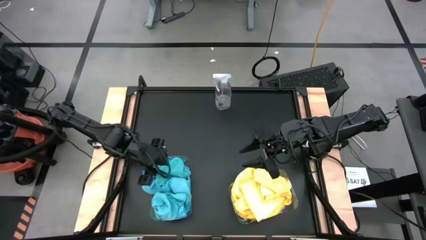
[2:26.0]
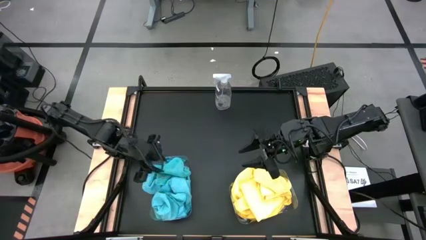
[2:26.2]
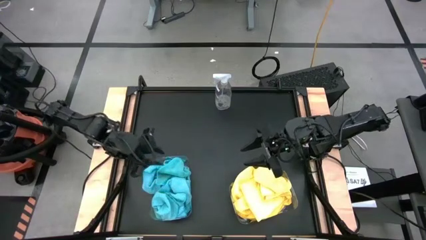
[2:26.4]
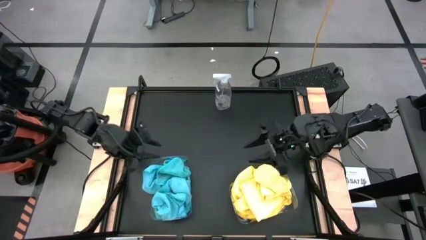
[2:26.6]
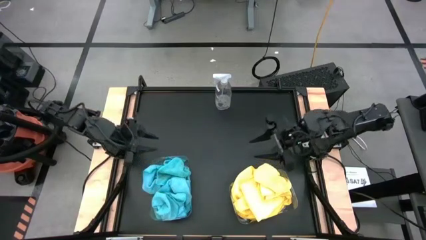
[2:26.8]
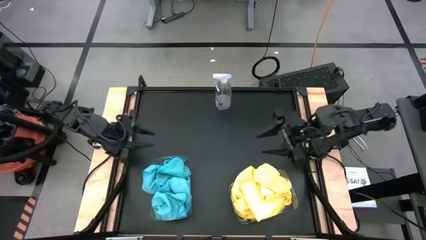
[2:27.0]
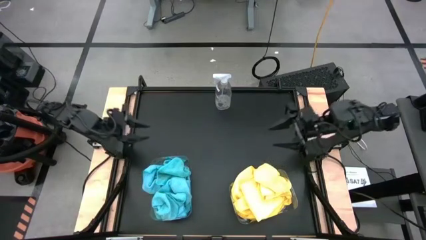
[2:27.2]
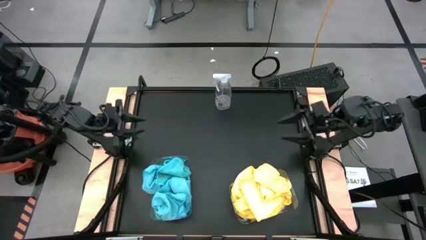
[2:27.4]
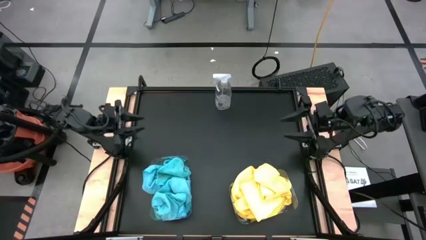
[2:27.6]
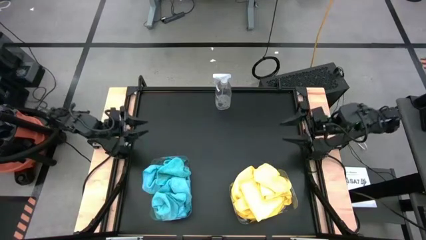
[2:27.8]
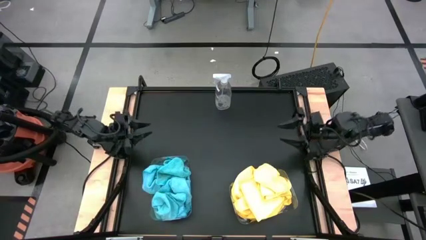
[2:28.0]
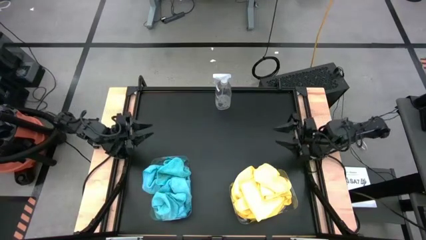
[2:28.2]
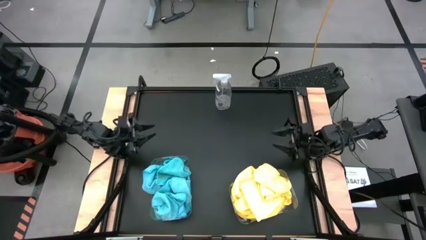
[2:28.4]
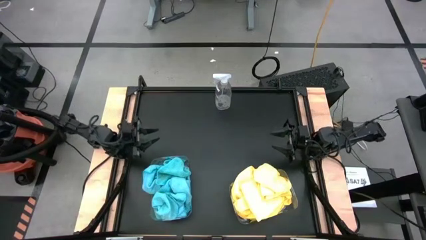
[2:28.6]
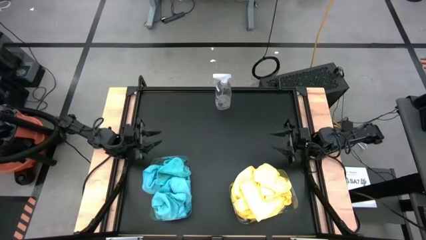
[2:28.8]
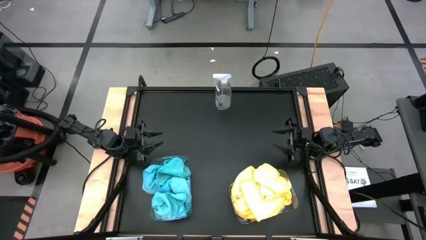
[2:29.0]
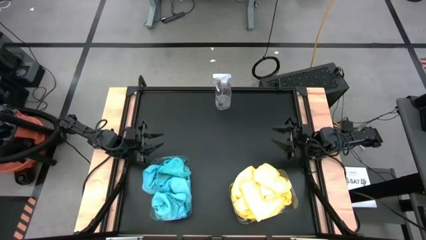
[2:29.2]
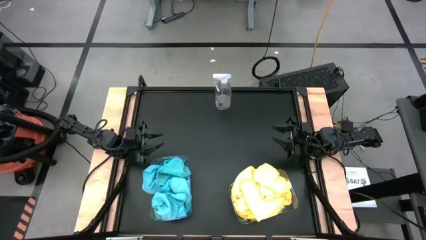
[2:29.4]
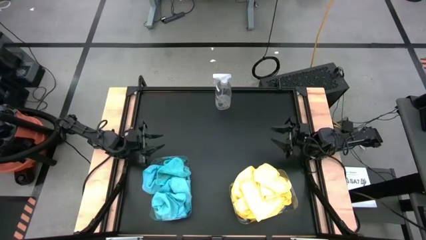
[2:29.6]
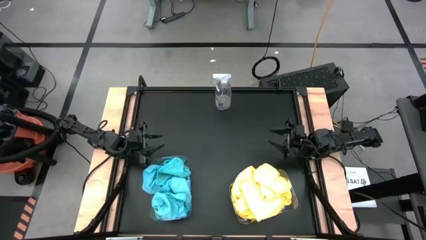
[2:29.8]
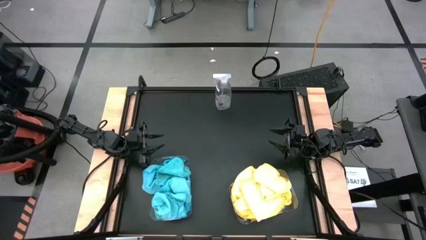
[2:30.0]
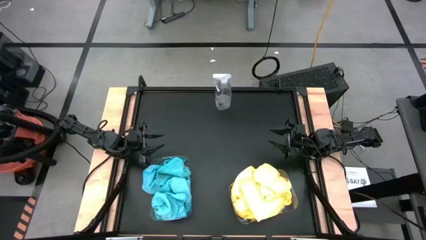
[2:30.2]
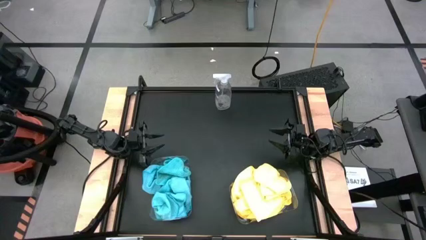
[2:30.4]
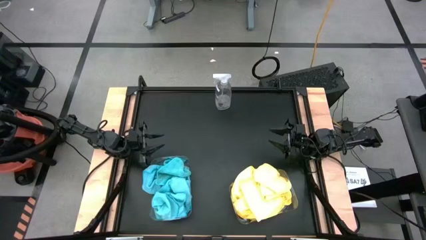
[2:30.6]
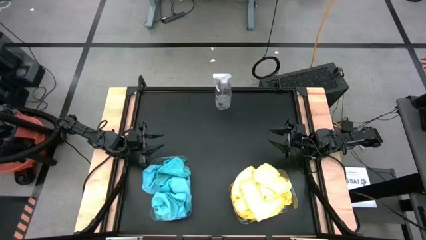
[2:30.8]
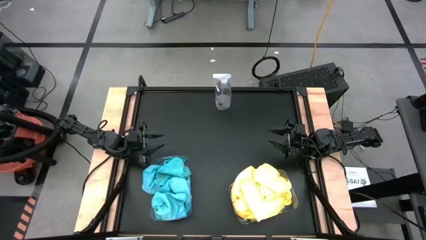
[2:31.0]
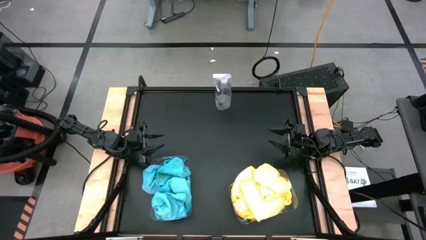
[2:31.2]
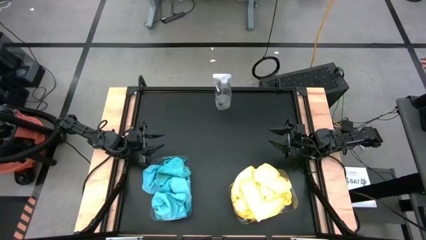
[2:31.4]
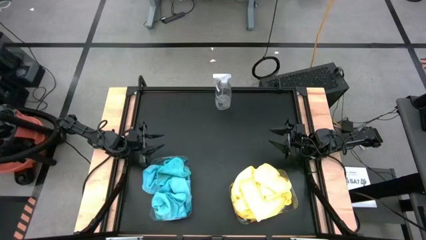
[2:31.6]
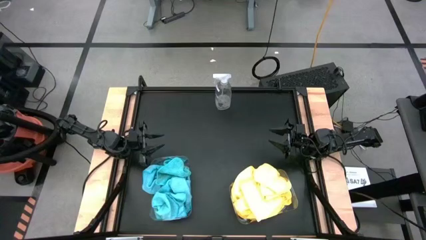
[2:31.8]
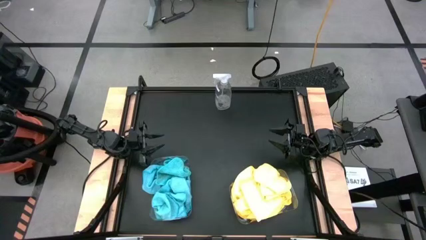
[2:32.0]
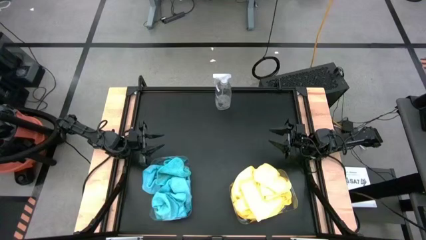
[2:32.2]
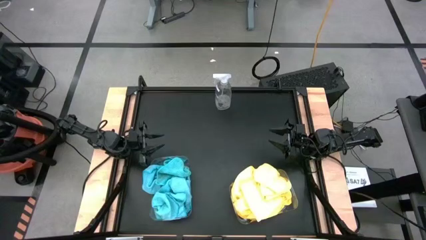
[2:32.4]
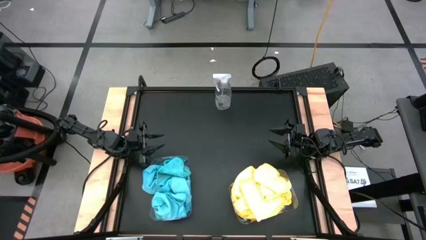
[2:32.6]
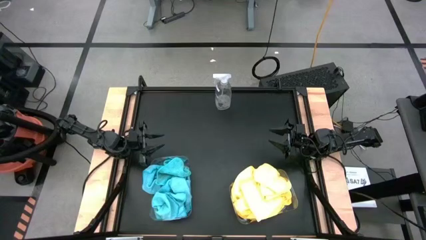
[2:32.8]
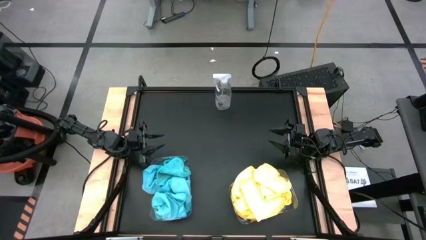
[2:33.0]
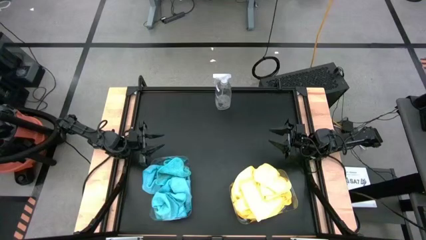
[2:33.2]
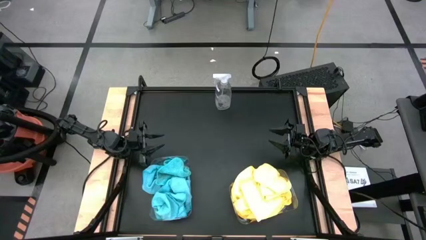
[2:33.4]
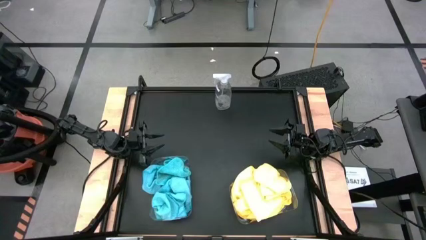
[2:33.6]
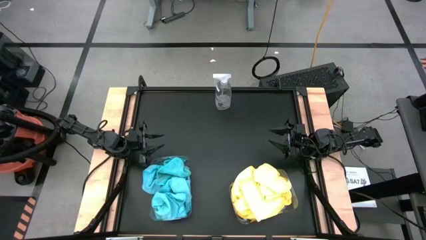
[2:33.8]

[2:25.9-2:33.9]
Task: Sort microfiber towel by color & place in baskets
Return to Home Position

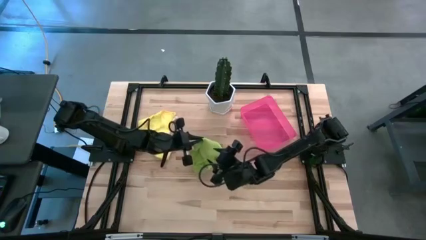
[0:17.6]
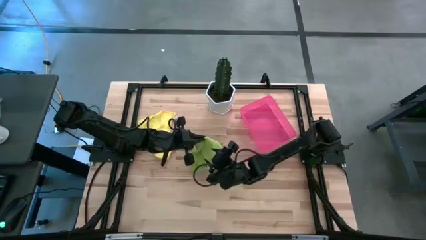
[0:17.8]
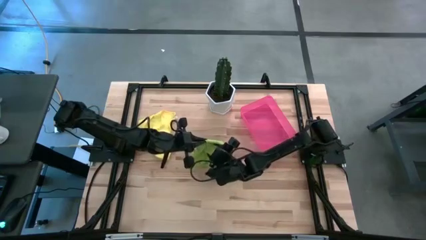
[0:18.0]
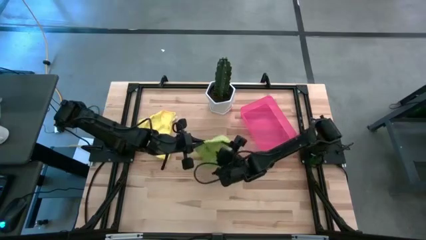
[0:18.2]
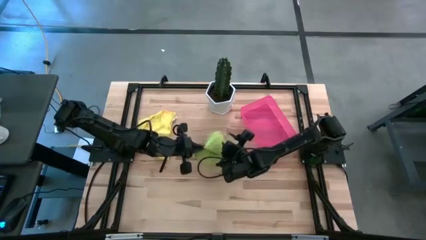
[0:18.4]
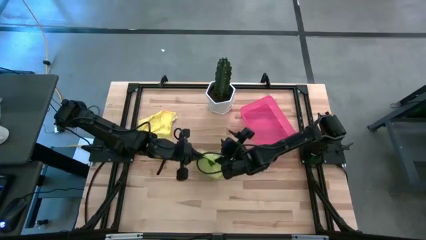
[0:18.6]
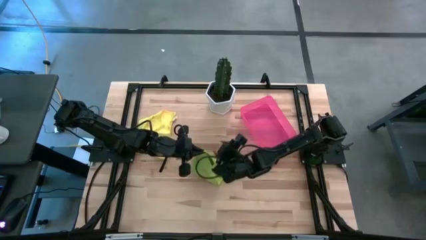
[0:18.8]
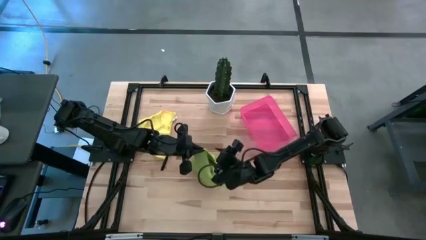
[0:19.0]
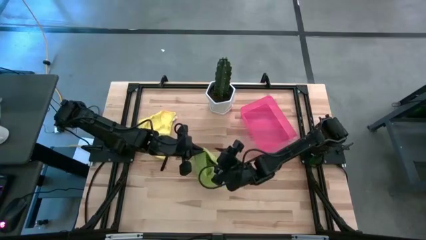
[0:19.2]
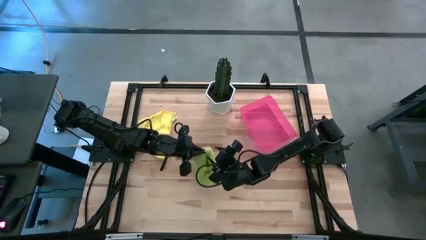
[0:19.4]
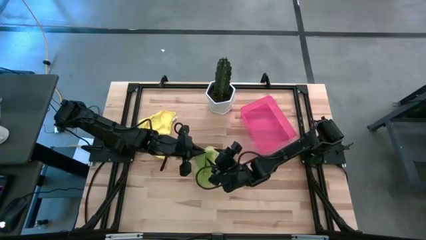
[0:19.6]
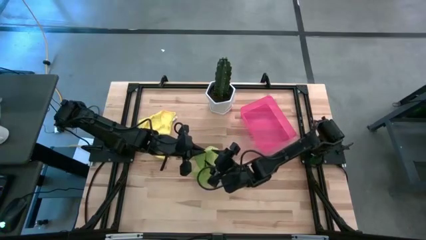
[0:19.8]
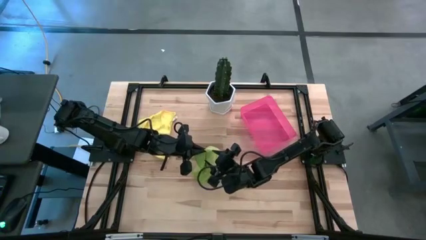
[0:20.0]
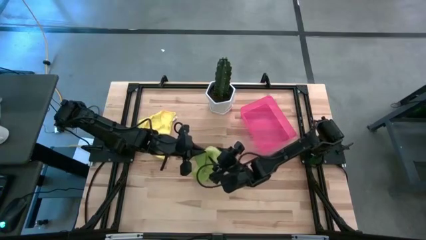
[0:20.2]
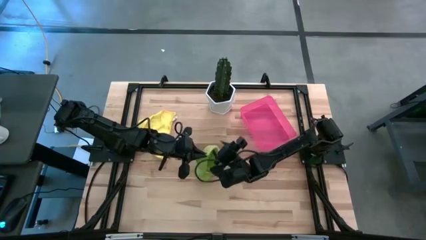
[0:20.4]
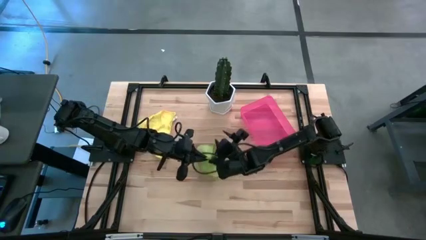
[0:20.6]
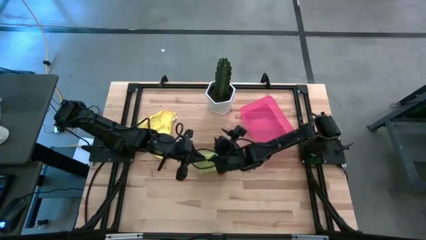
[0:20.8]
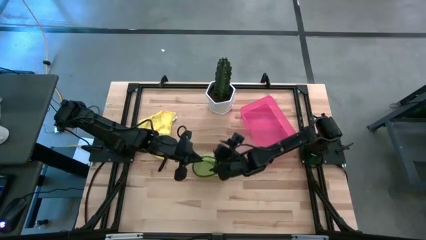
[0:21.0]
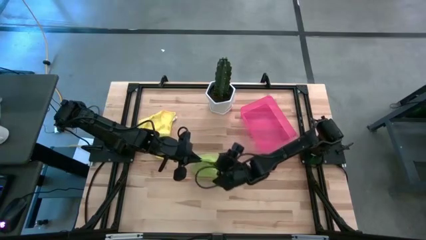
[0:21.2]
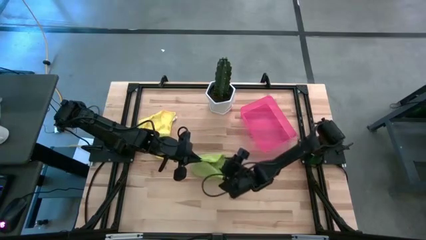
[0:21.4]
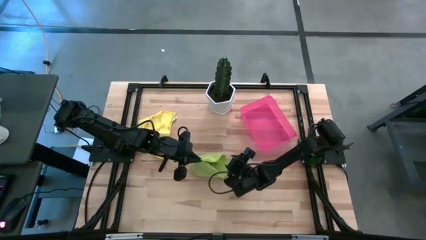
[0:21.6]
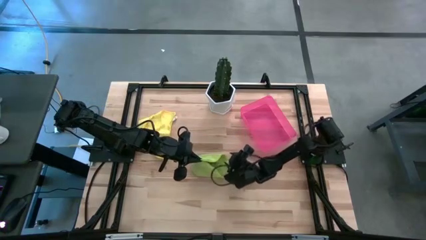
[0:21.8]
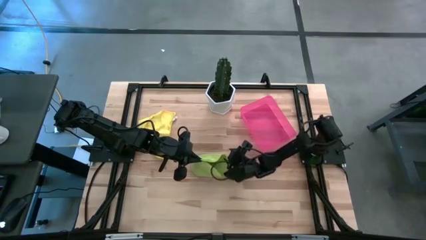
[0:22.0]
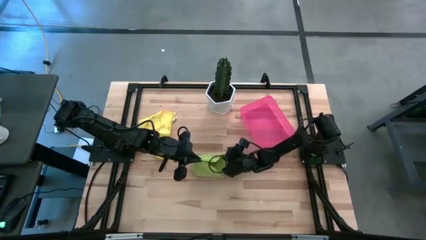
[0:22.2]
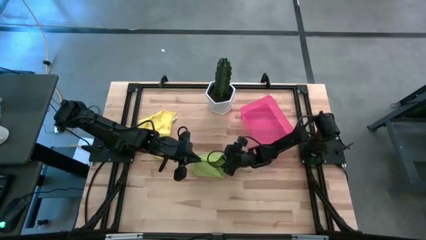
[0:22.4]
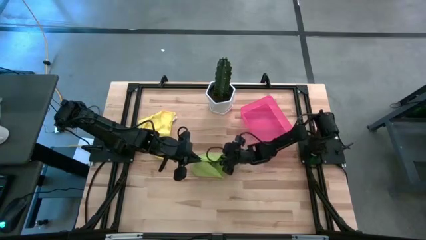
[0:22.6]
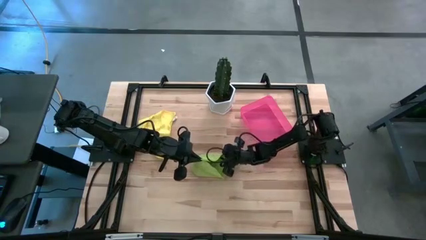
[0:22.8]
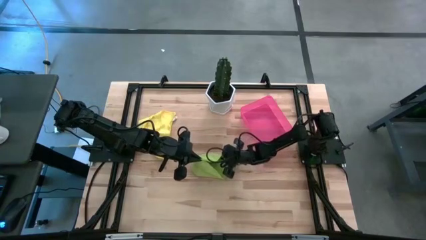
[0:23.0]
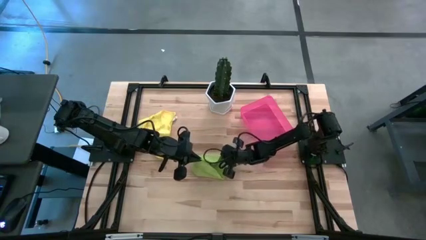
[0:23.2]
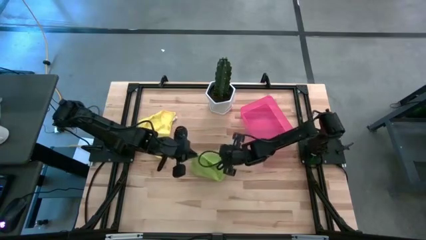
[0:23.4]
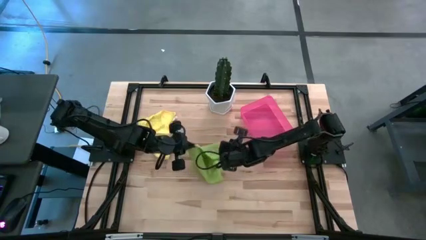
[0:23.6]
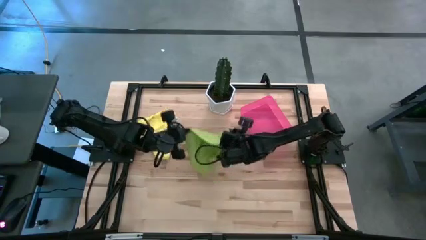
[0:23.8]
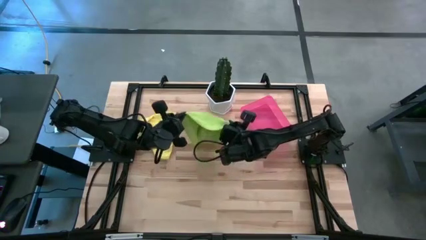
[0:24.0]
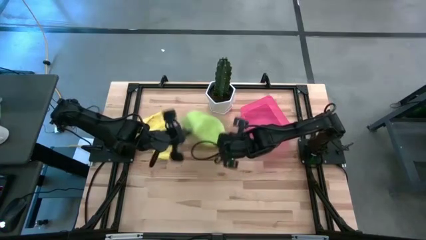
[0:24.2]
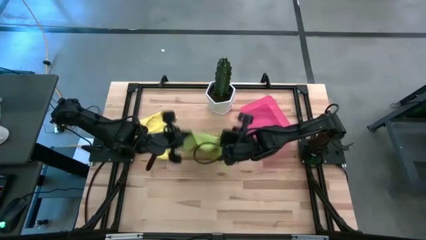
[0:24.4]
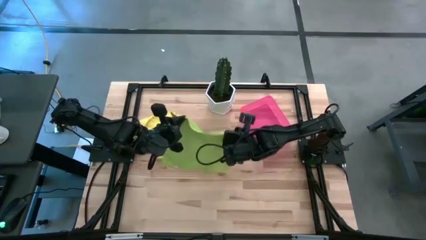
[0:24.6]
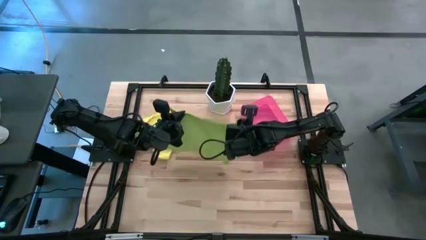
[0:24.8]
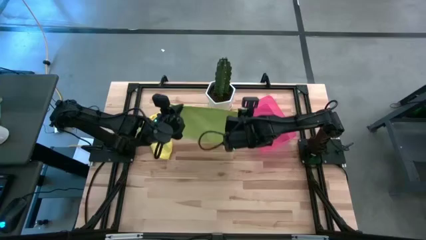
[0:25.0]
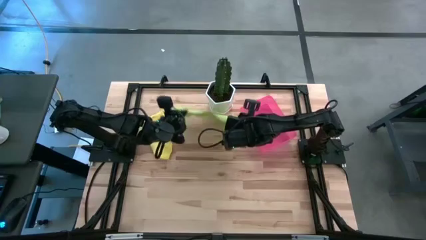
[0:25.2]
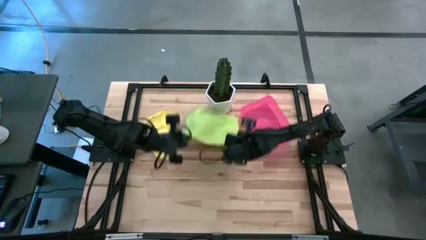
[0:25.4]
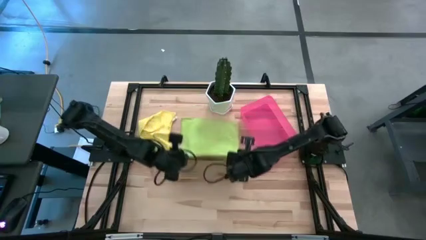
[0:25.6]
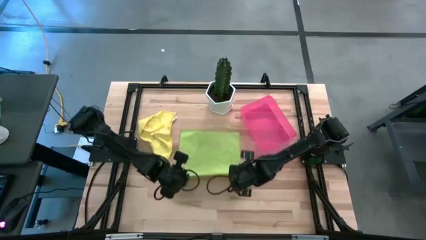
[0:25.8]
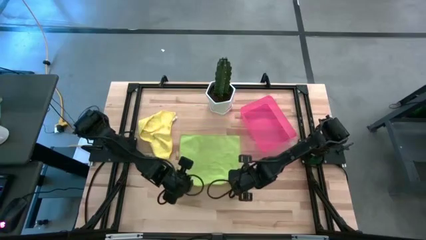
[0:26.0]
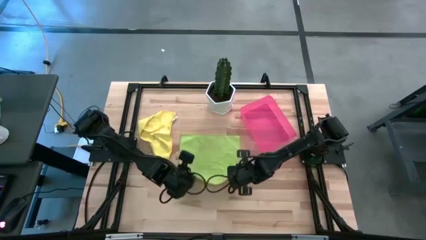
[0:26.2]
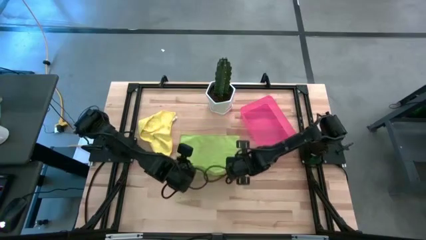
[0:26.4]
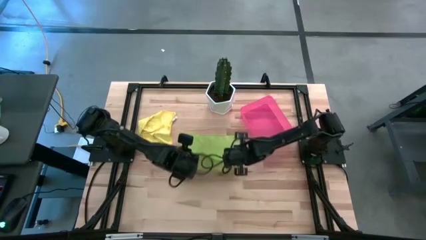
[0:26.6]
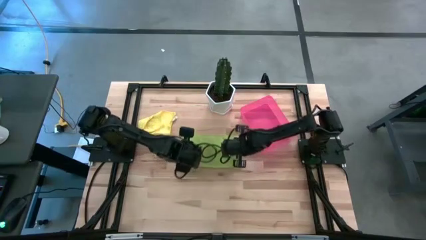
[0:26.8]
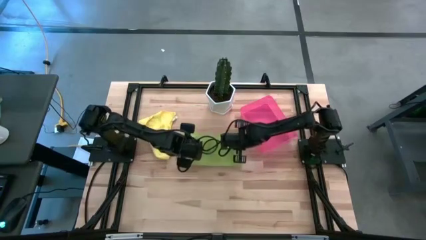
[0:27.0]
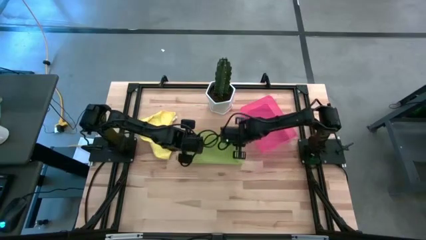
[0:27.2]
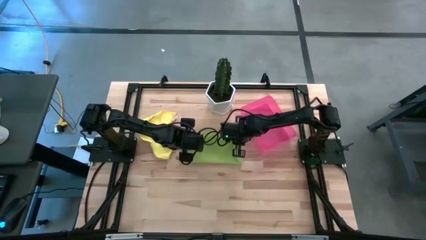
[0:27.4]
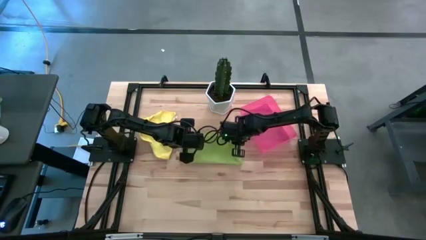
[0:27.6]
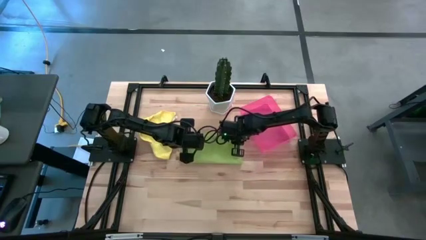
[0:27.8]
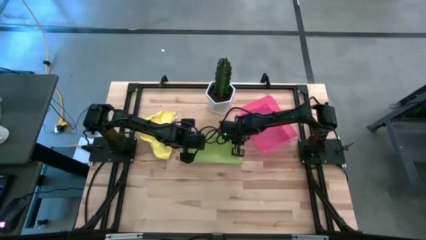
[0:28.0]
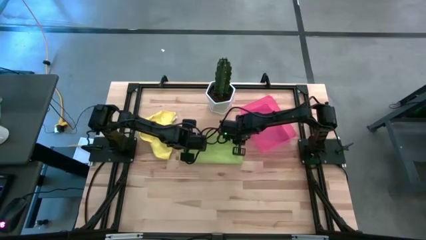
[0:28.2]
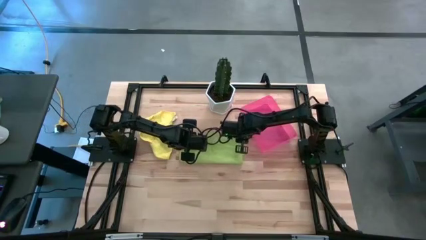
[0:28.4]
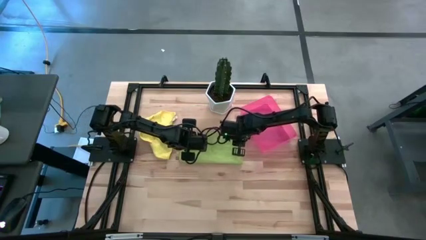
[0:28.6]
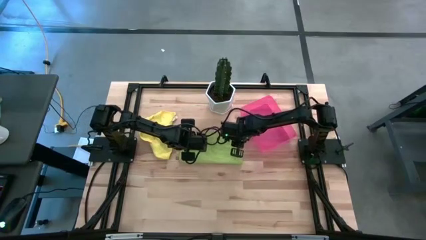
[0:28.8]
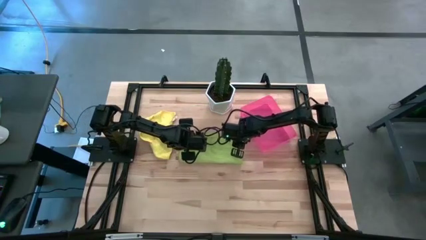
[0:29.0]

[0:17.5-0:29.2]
Task: Roll microfiber towels into tight, uniform cylinder then place into a basket
Fold the green towel
